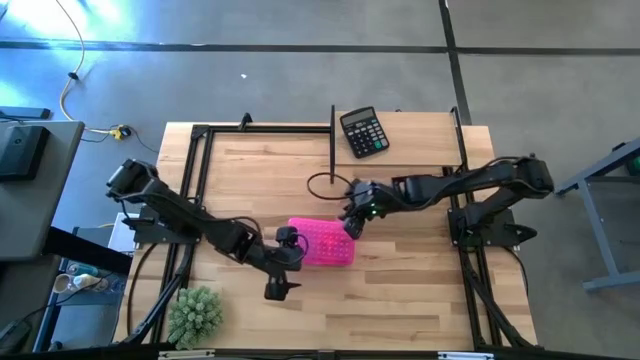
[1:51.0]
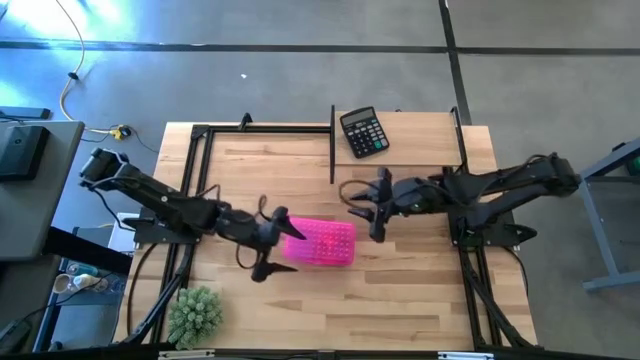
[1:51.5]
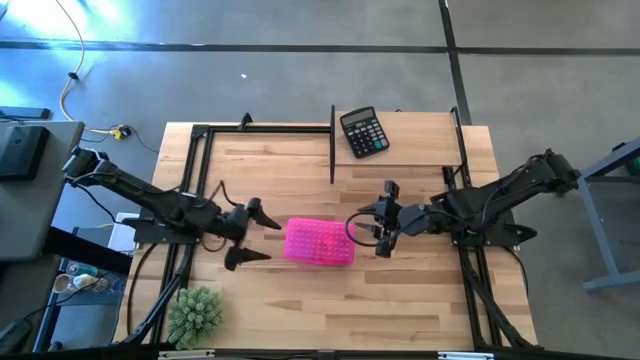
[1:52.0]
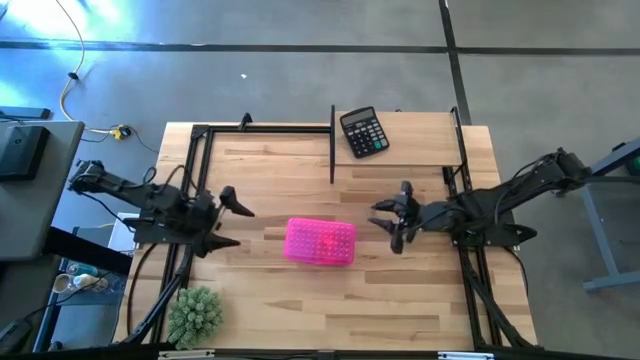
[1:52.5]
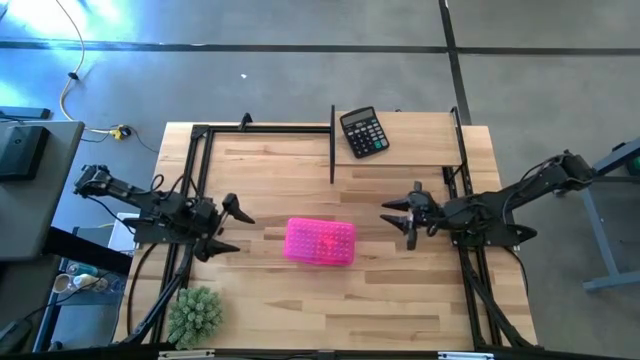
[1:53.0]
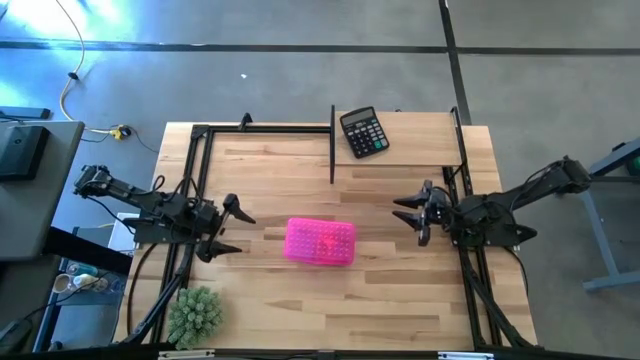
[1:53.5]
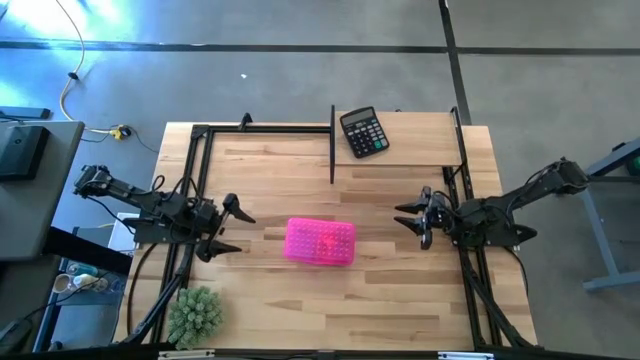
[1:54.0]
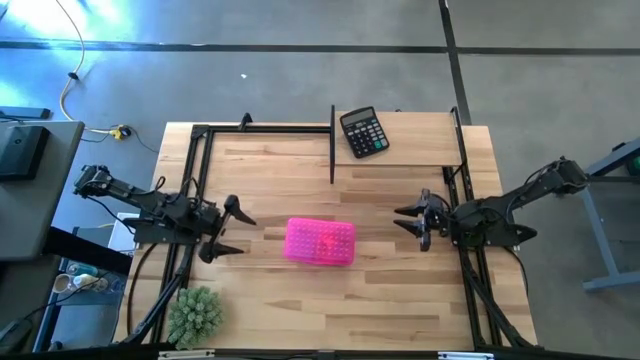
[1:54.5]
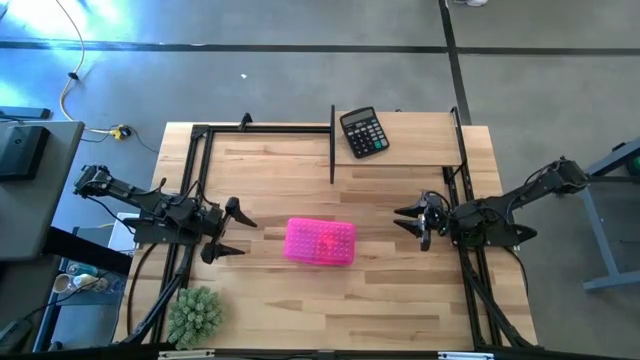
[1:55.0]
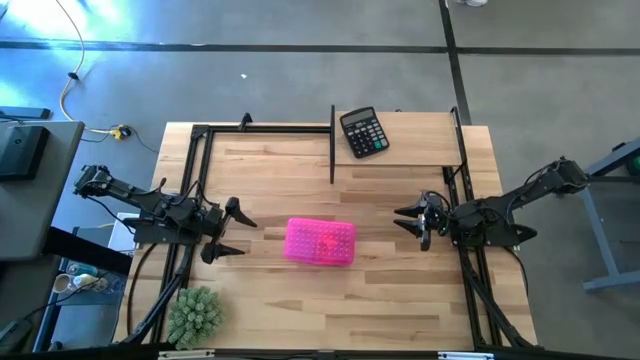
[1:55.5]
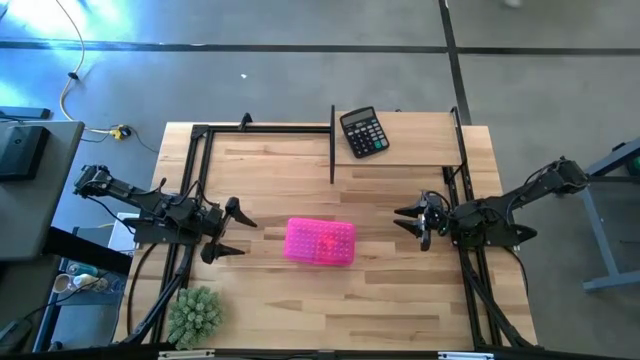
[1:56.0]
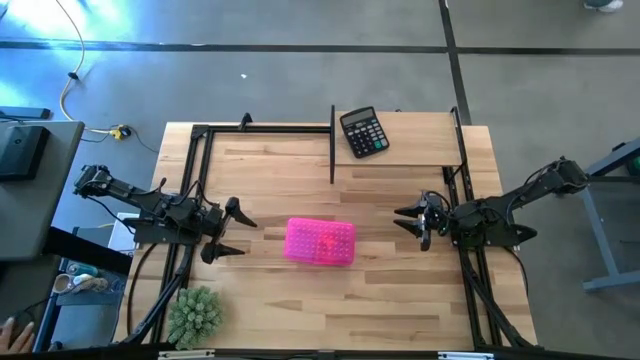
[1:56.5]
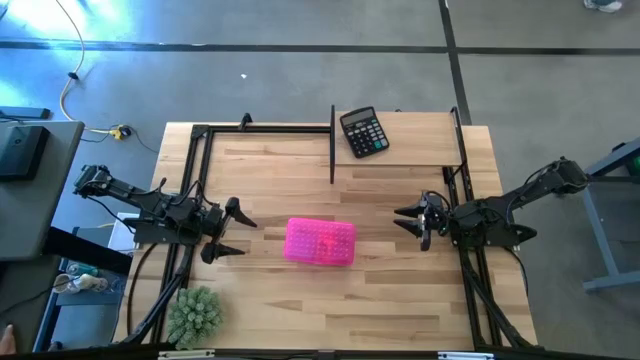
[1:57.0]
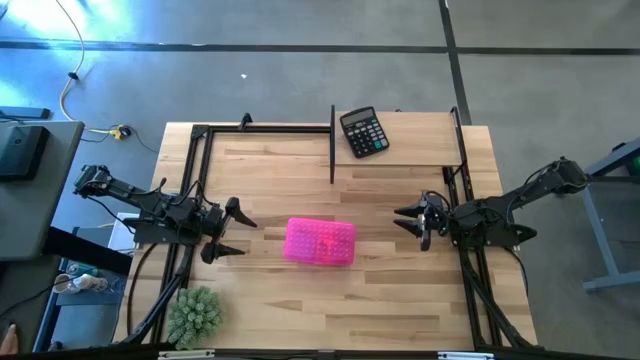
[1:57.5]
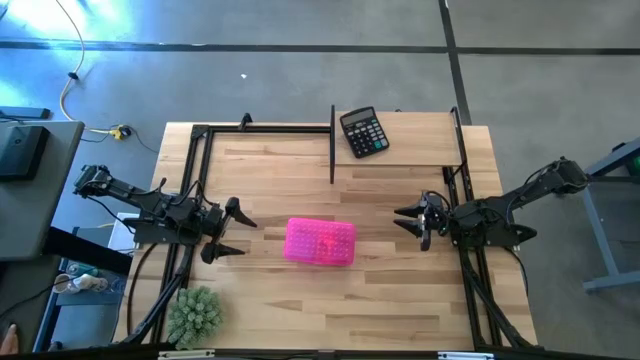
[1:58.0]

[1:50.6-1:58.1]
Task: Pack school essentials
Return to Home Position

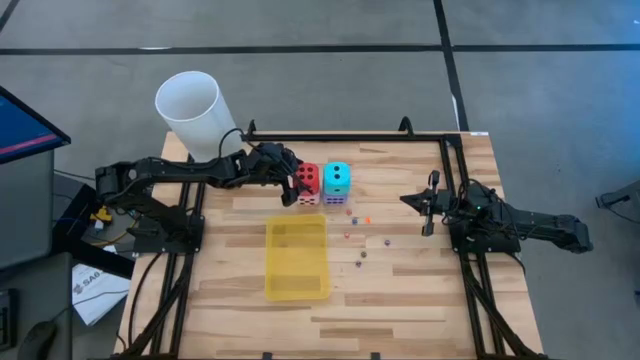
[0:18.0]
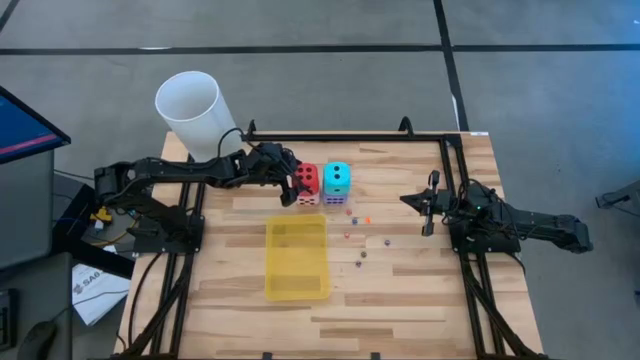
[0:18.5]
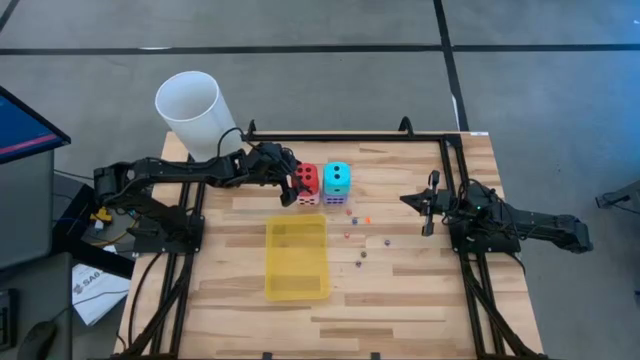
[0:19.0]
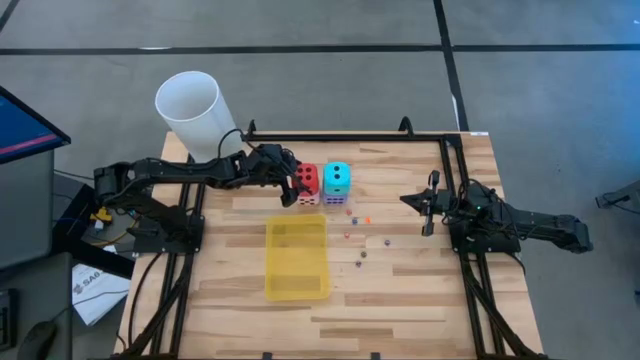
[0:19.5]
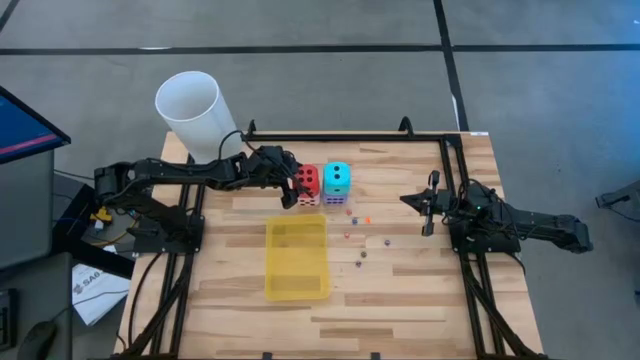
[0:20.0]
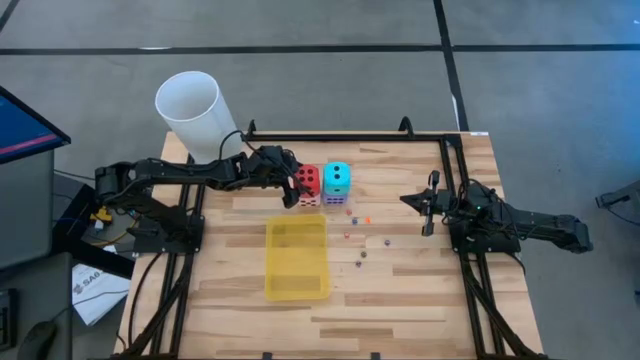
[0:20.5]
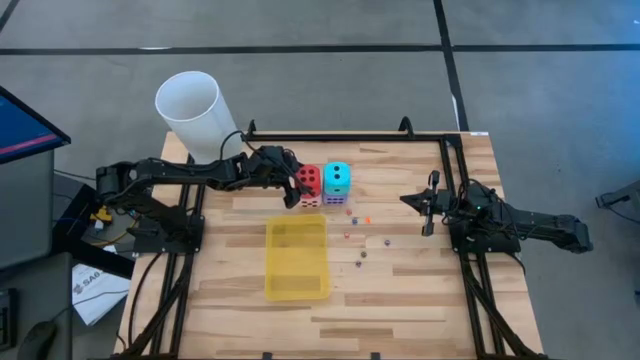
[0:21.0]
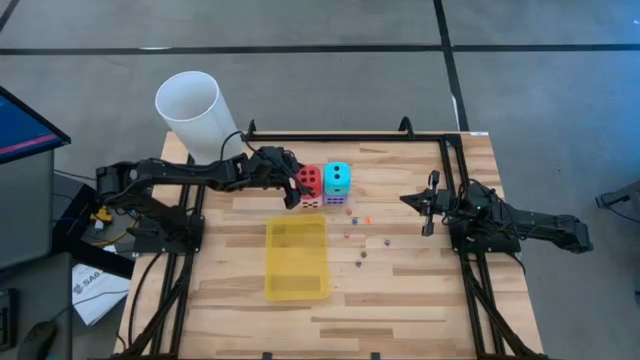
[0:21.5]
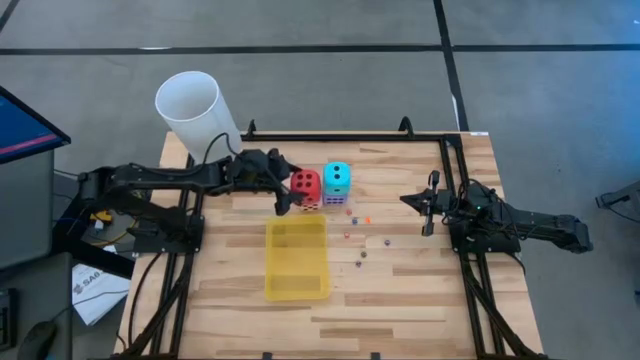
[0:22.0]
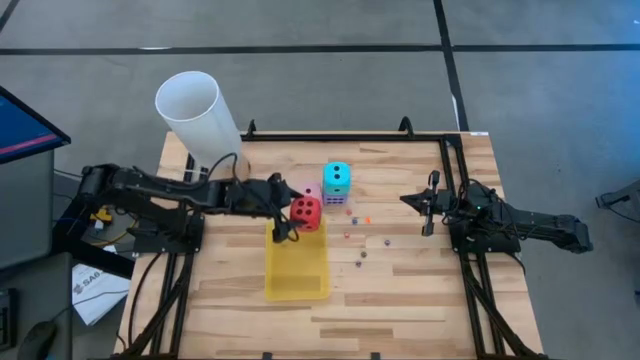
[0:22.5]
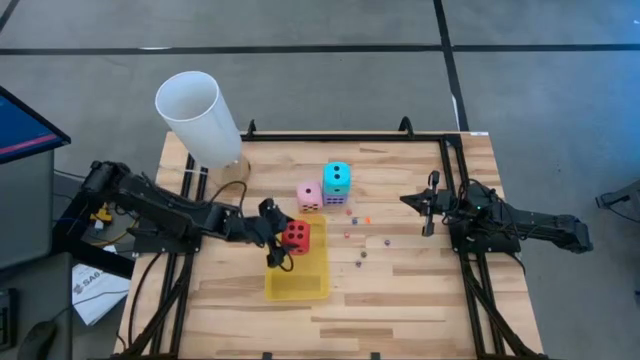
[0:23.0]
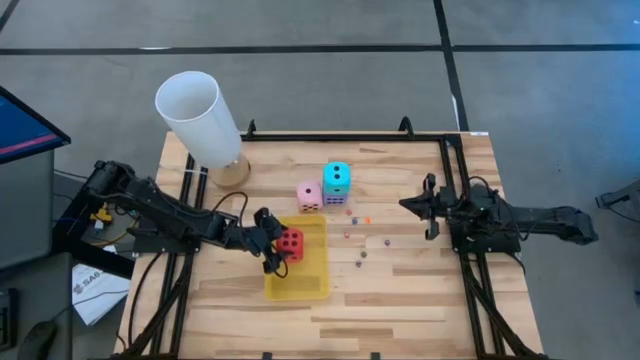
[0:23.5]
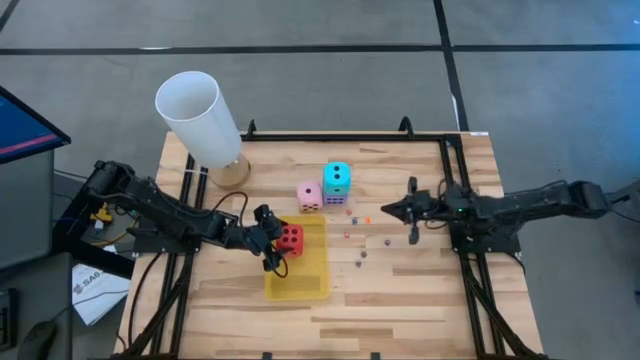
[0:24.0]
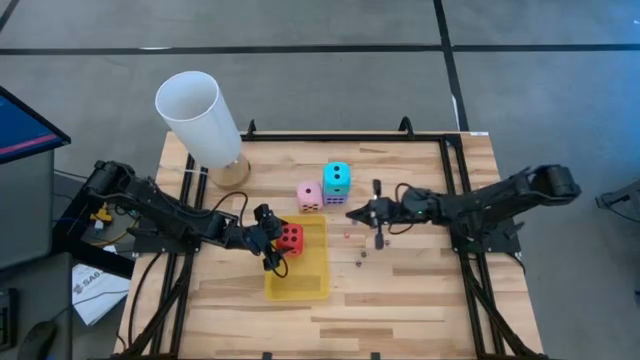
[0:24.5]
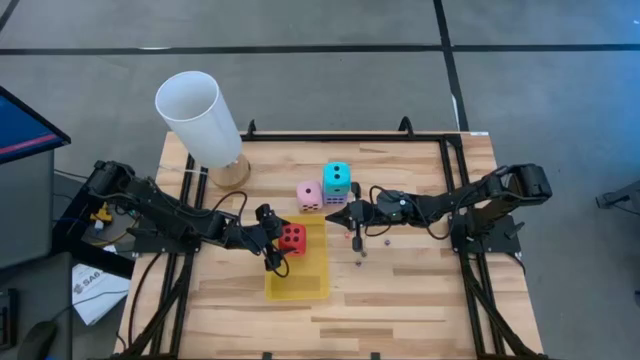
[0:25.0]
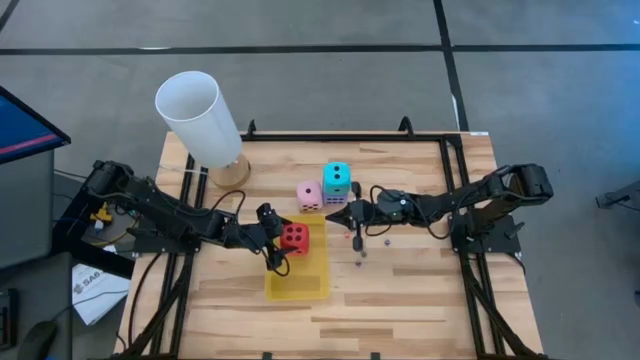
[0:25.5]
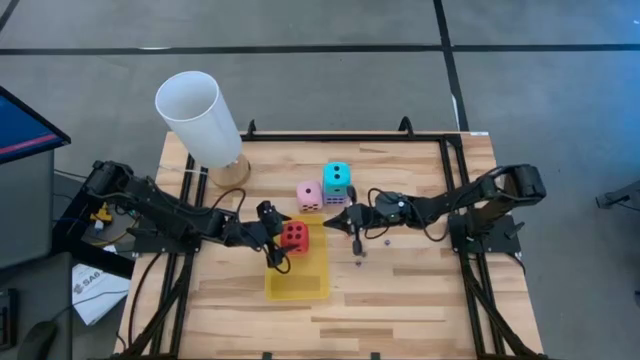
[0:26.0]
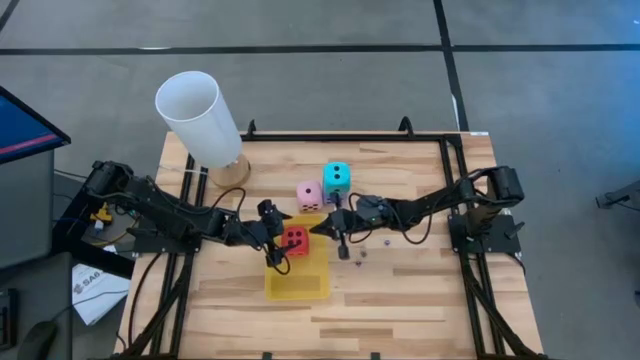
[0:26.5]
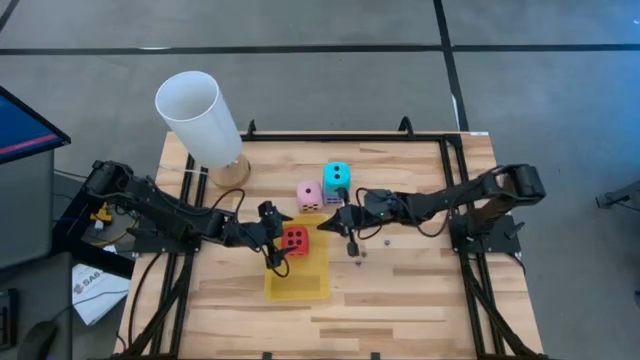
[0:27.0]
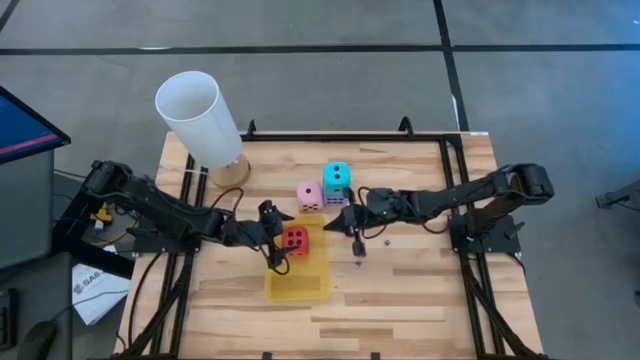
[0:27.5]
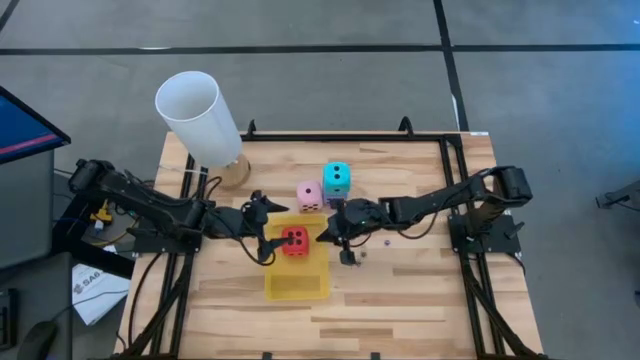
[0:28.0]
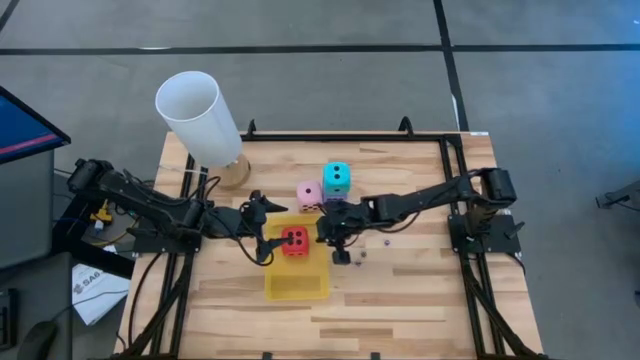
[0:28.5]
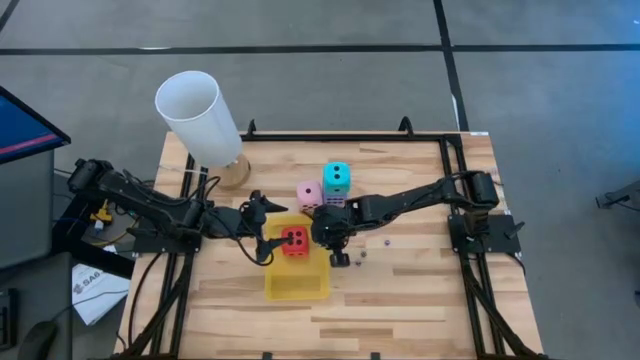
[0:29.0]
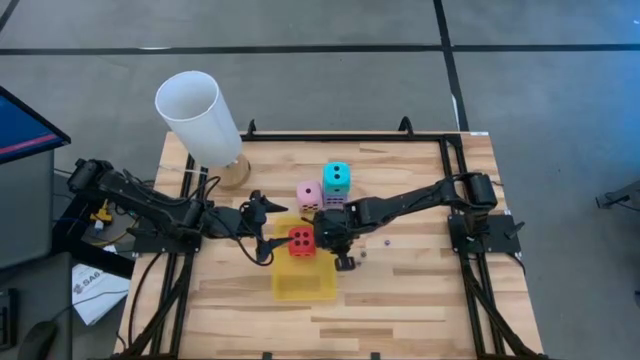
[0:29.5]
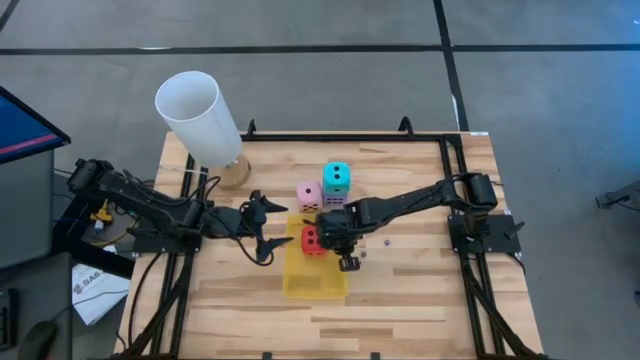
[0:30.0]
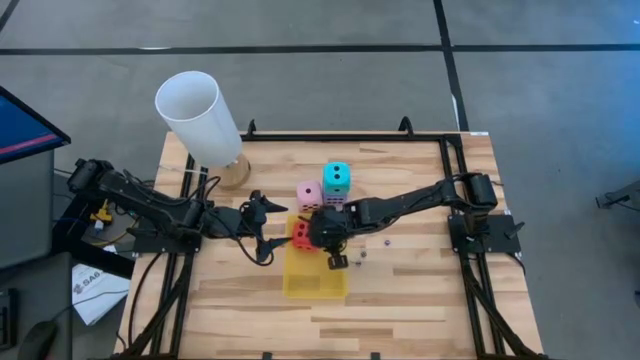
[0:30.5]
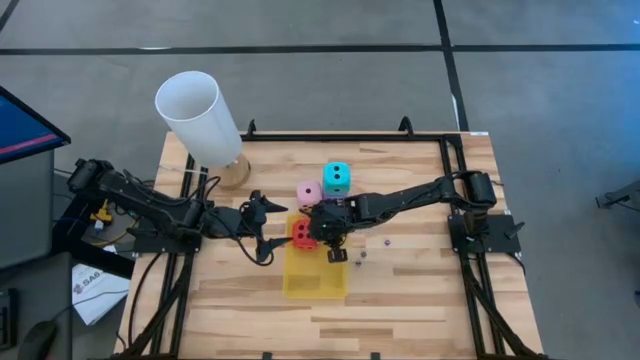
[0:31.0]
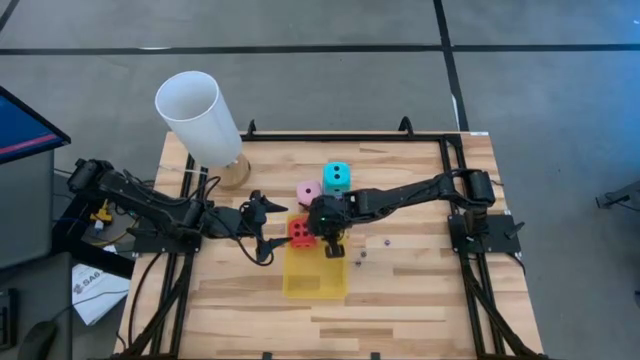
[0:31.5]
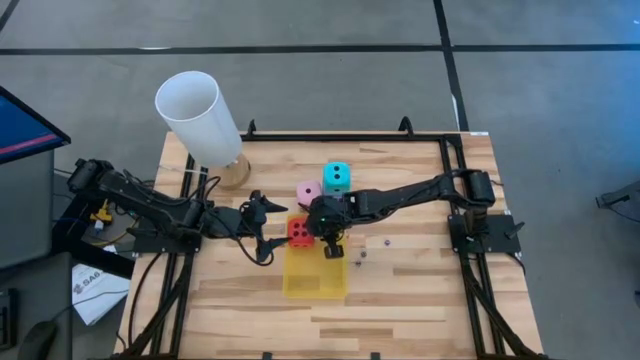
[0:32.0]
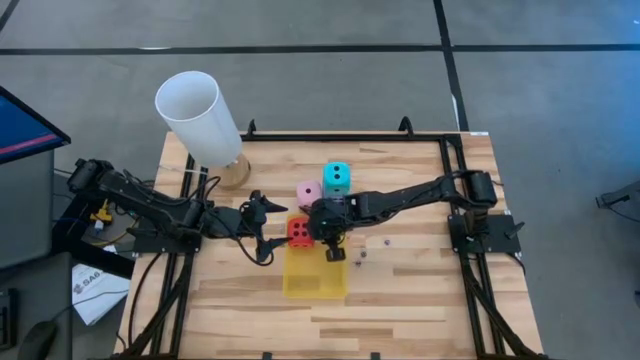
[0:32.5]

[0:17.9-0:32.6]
Task: Pick & Place Dice
Put the red die into the yellow bin
